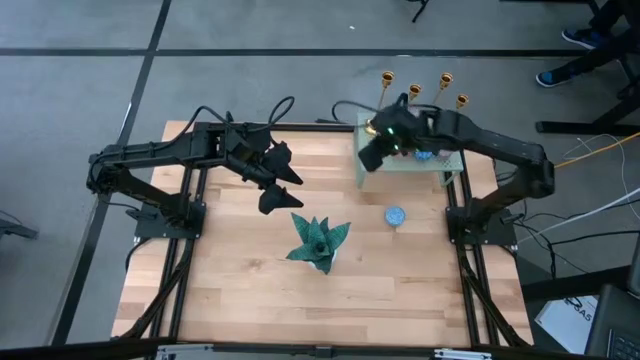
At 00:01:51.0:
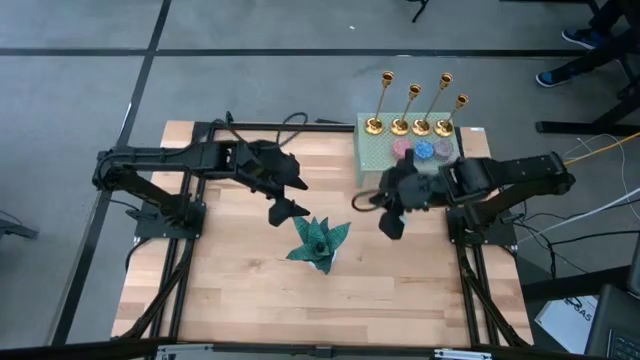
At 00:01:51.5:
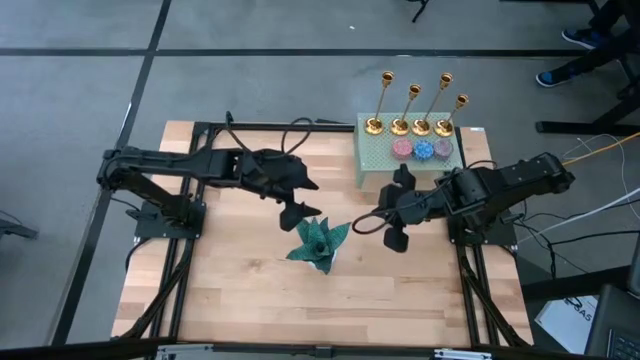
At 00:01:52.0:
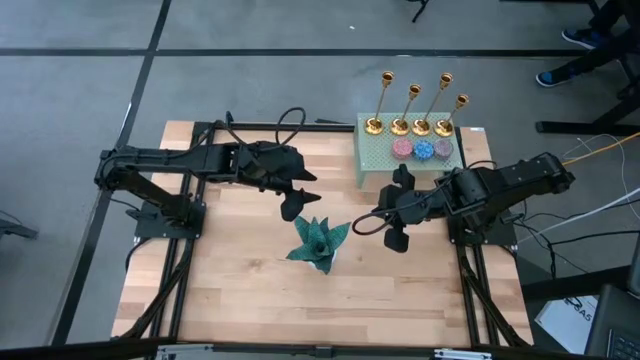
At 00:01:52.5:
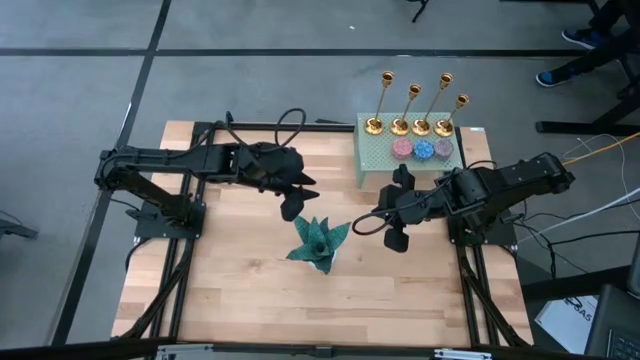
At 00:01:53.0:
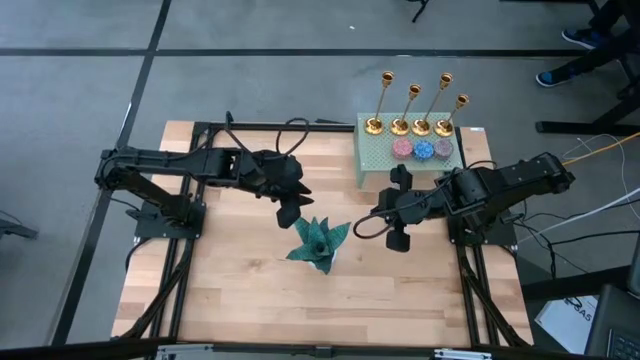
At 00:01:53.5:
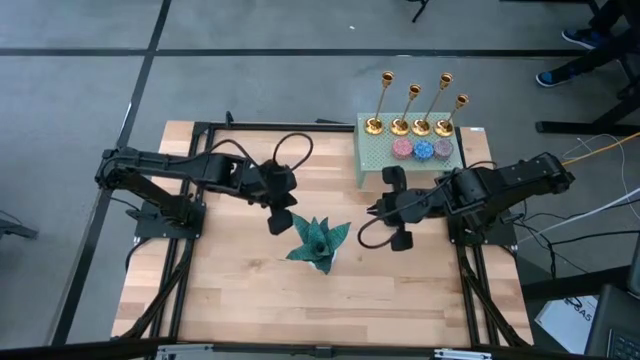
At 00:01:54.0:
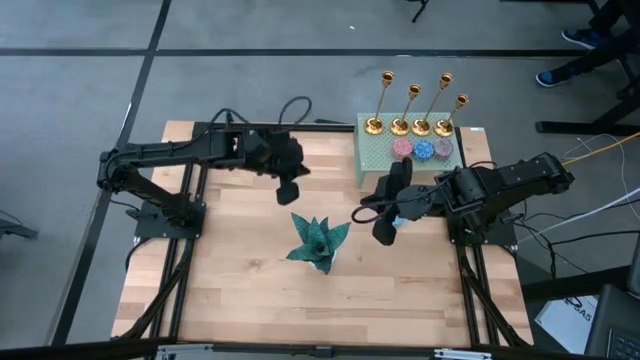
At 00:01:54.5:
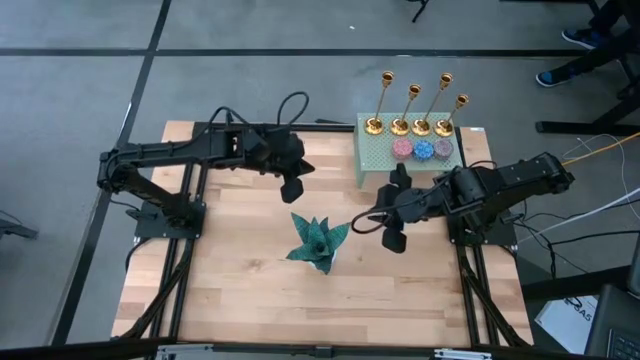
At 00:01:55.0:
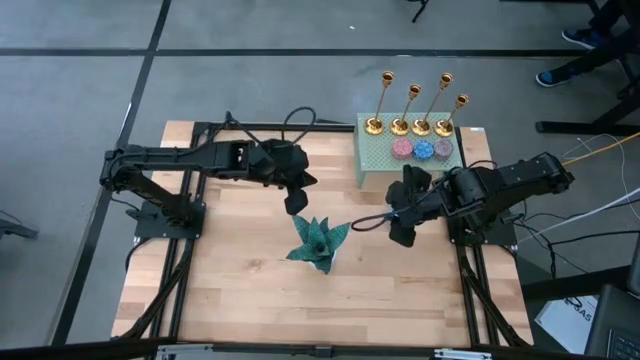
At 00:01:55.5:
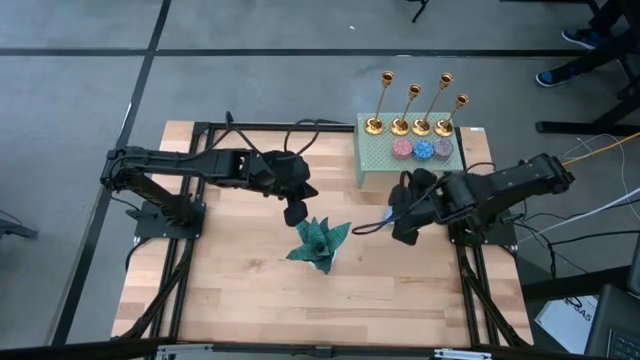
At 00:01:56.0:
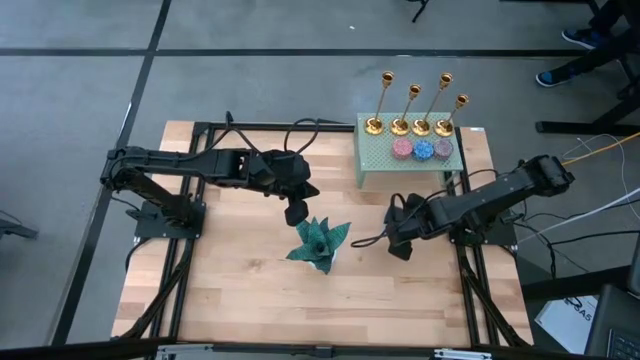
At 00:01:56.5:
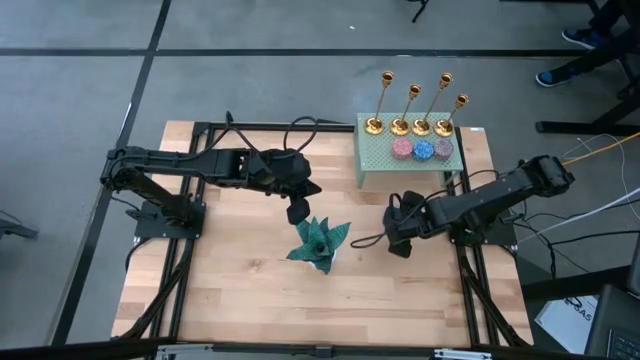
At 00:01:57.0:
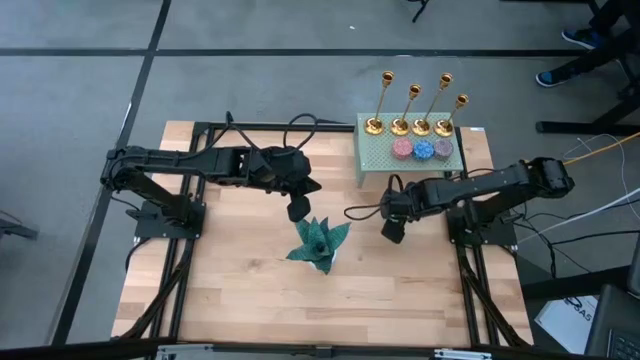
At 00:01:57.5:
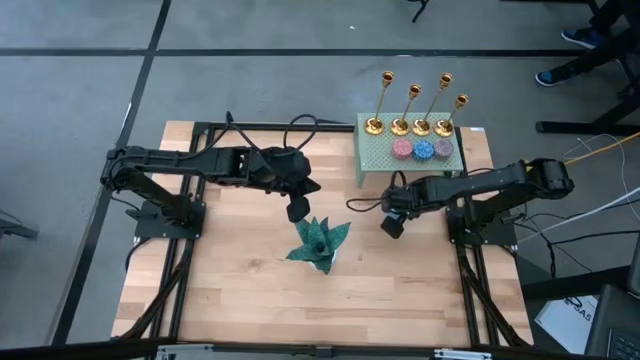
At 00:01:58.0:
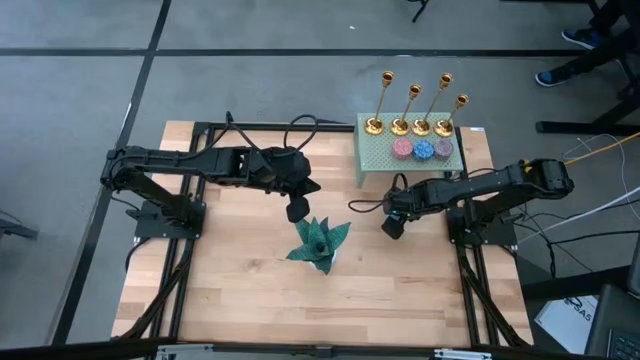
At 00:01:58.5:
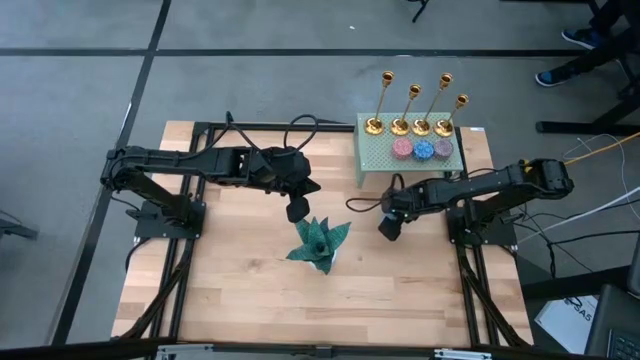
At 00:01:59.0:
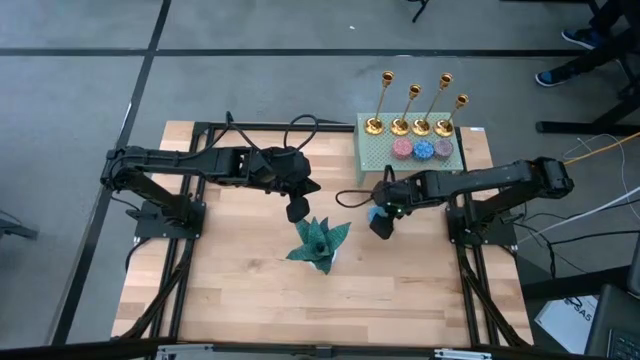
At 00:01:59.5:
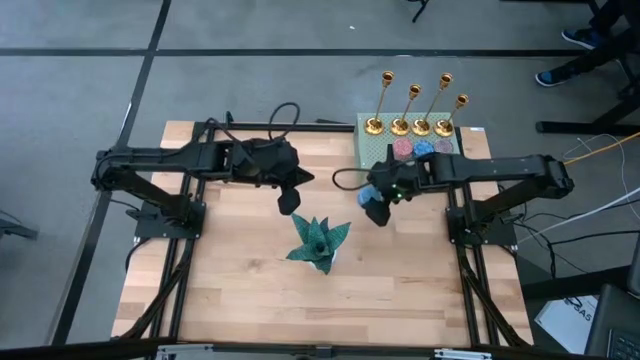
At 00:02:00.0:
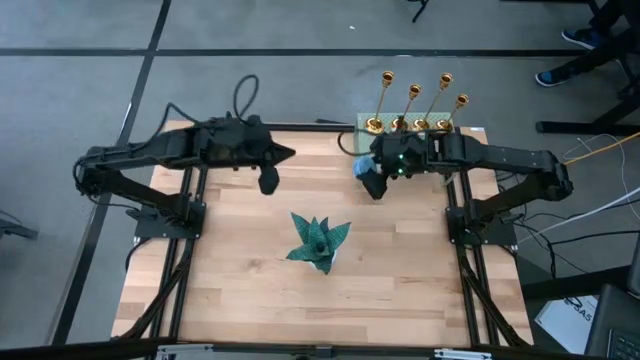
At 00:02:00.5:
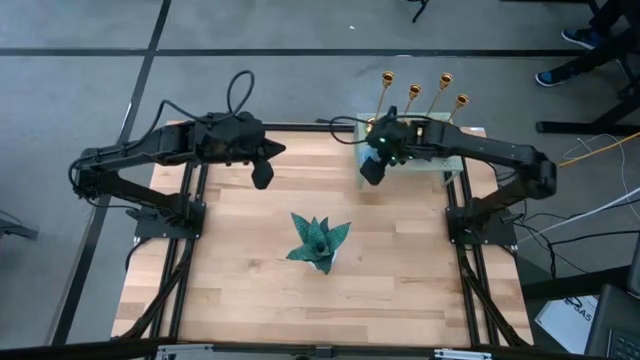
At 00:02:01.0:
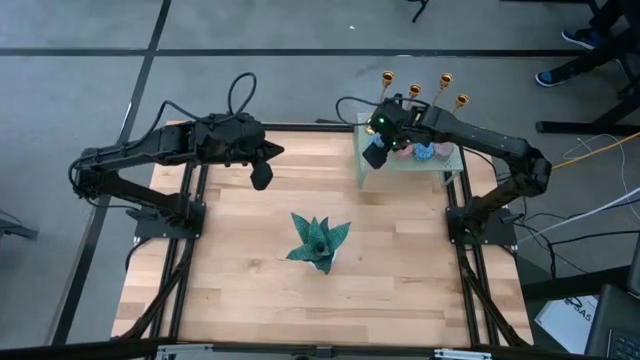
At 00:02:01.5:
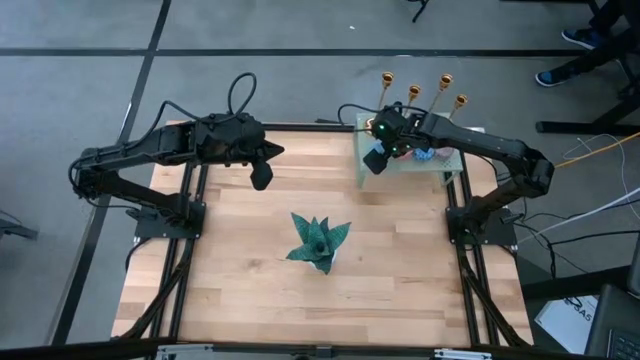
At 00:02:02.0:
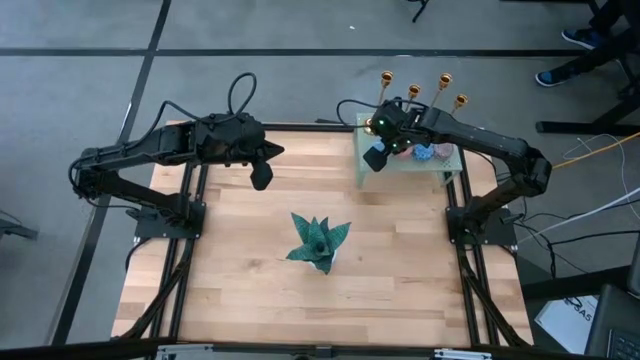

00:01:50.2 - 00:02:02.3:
Task: Stock candles and holders on shelf
Align the light blue scented candle with the other scented candles on the shelf

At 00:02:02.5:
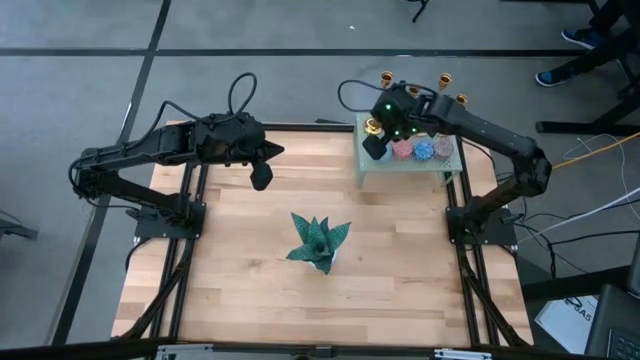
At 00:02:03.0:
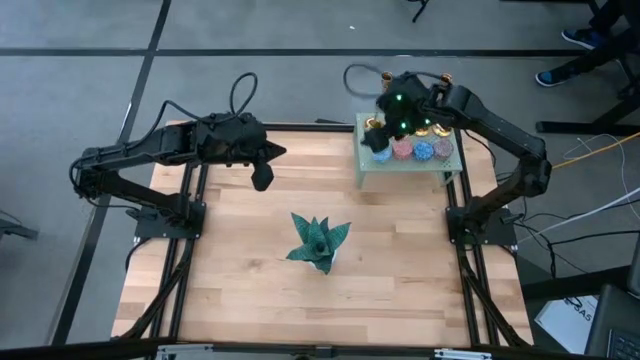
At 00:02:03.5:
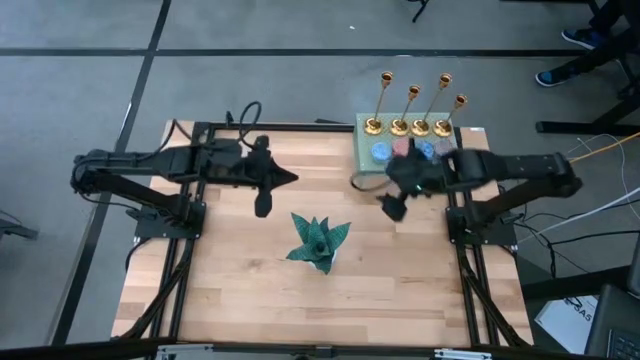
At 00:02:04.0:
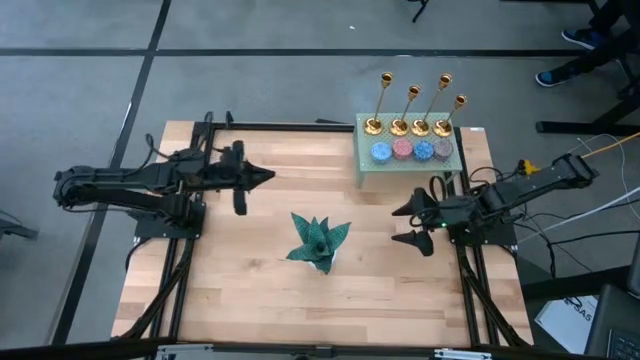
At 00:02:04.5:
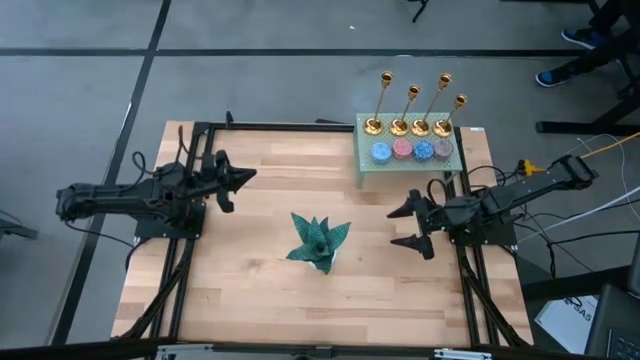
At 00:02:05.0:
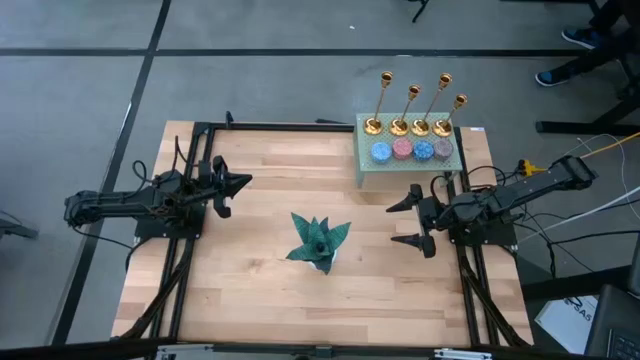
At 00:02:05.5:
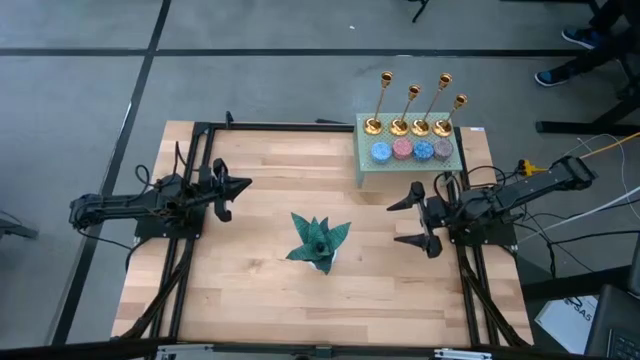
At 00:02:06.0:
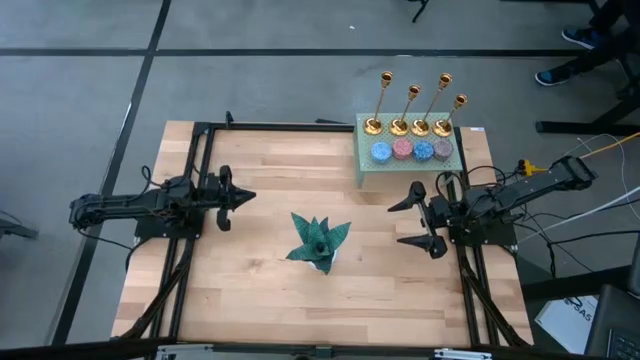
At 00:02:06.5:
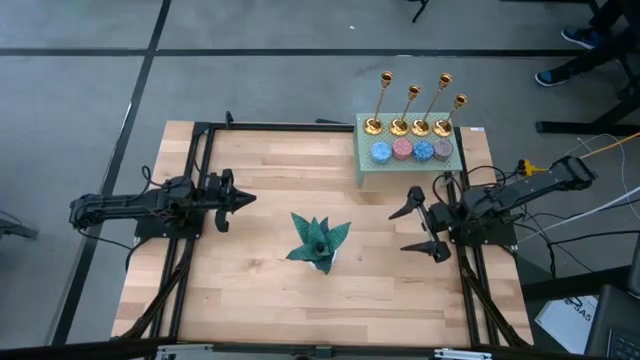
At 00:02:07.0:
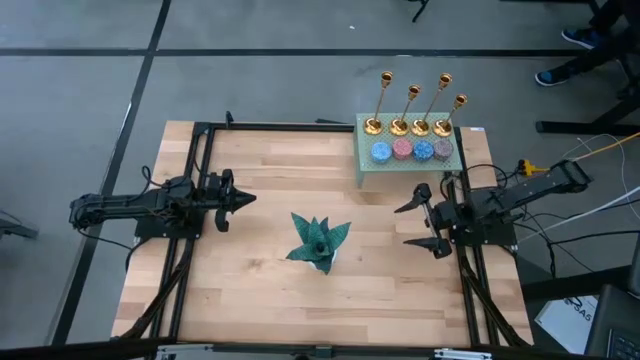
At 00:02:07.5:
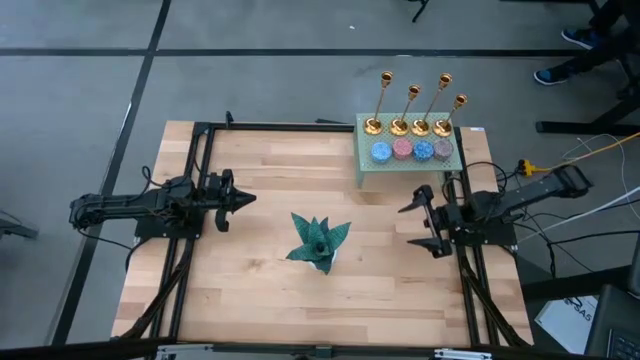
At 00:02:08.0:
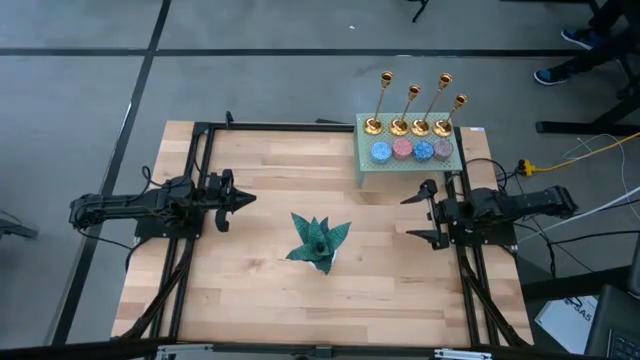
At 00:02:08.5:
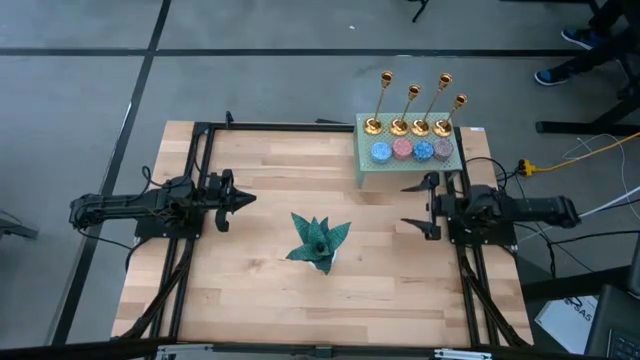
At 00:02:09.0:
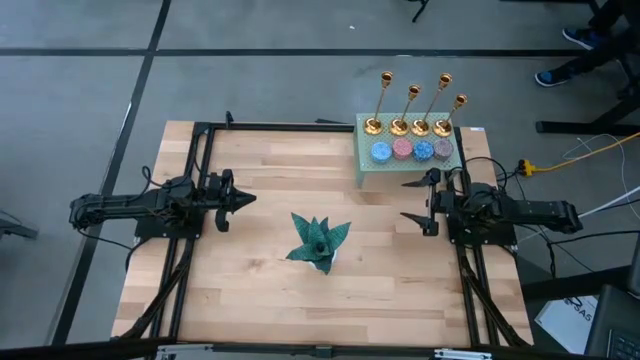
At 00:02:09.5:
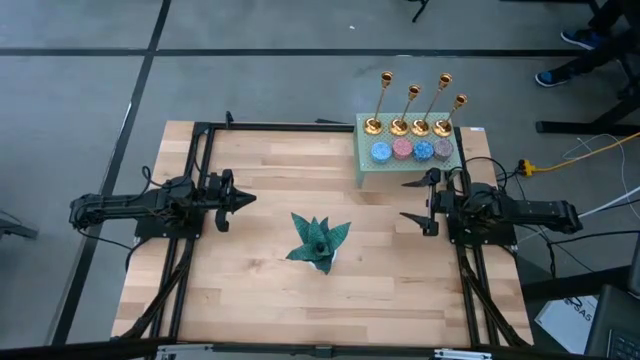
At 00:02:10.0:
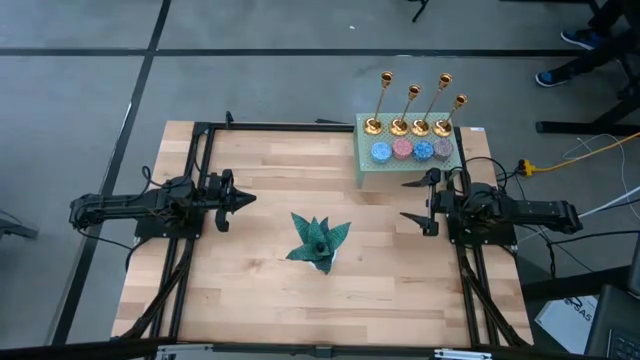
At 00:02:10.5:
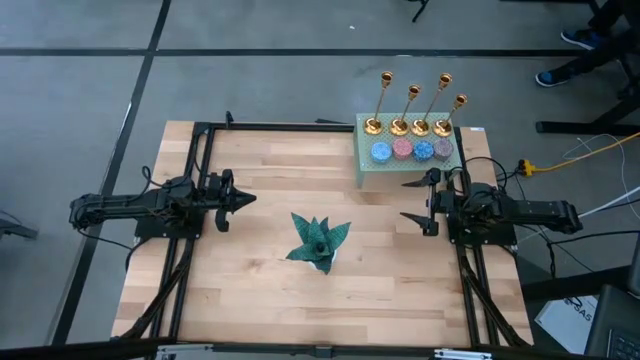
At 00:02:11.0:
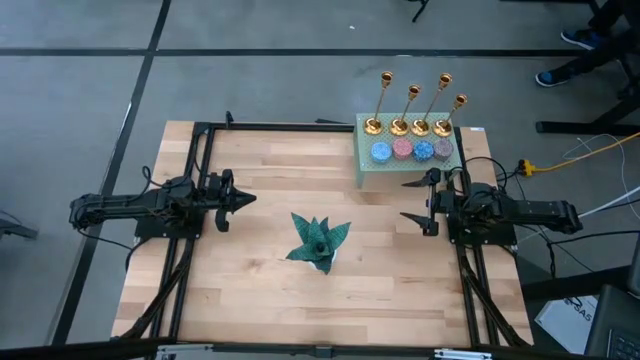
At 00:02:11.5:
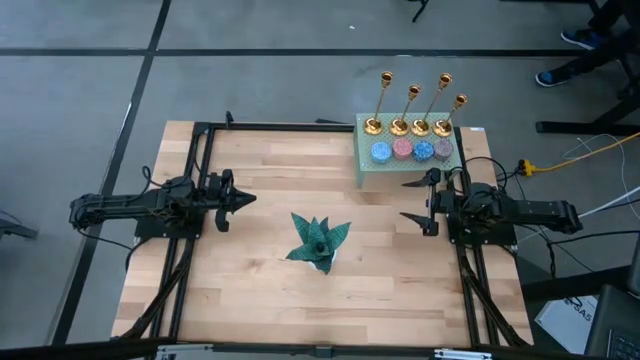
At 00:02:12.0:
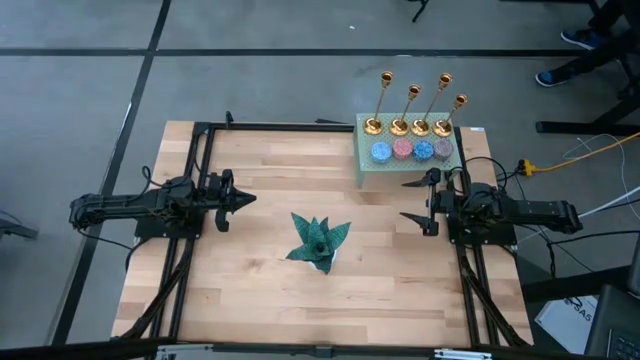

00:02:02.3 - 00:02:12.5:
Return to Home Position
